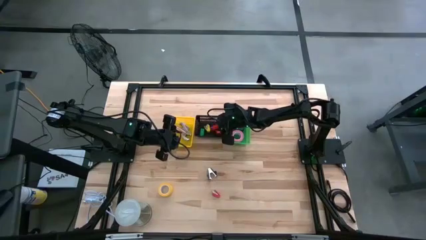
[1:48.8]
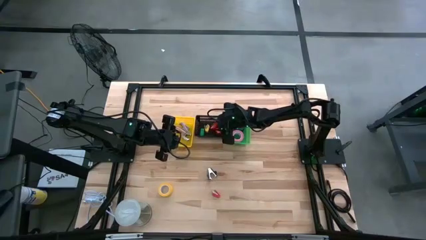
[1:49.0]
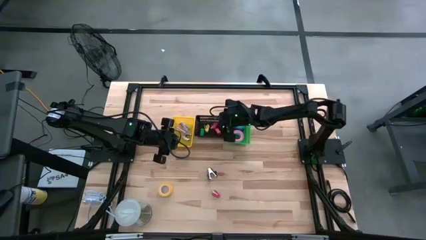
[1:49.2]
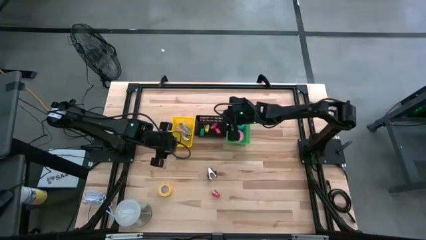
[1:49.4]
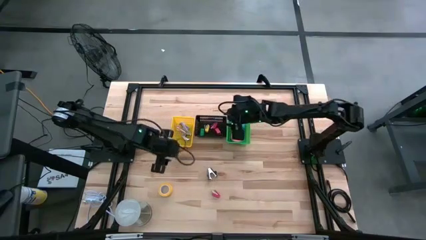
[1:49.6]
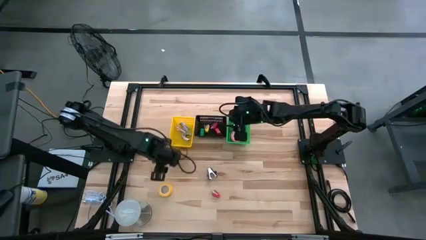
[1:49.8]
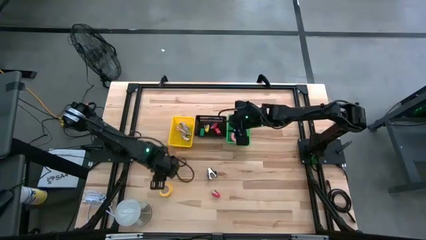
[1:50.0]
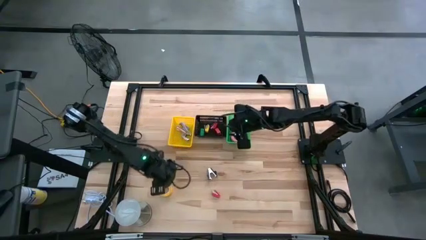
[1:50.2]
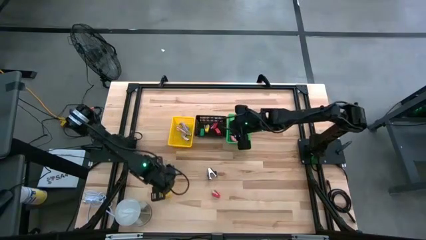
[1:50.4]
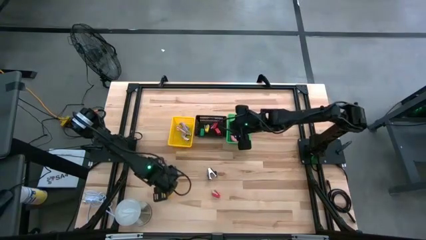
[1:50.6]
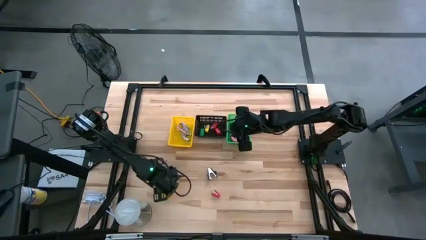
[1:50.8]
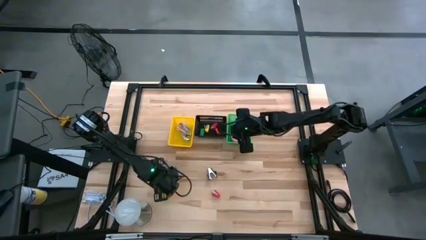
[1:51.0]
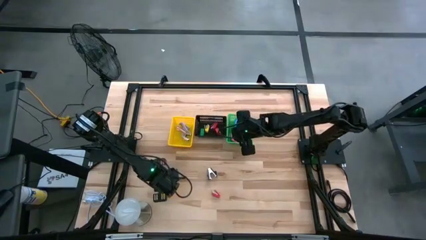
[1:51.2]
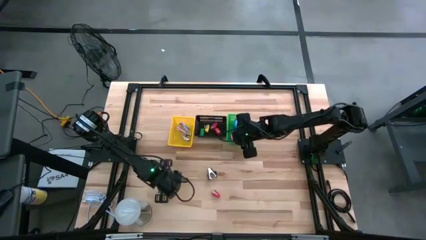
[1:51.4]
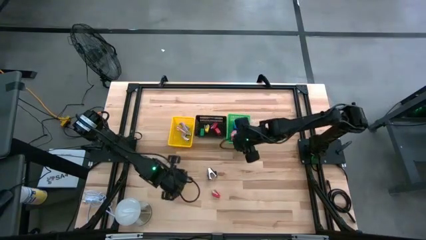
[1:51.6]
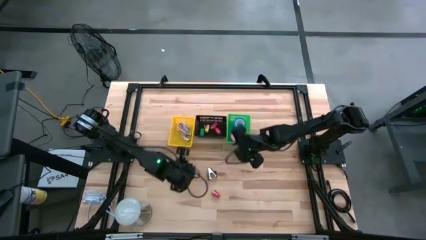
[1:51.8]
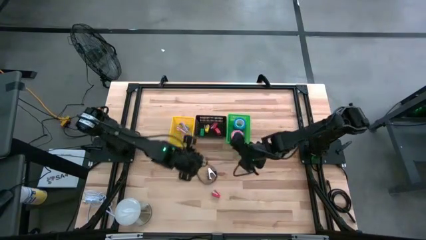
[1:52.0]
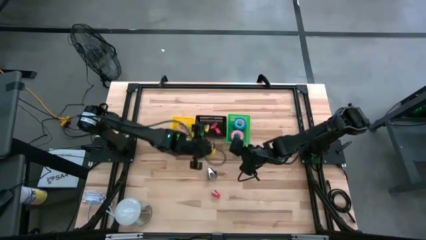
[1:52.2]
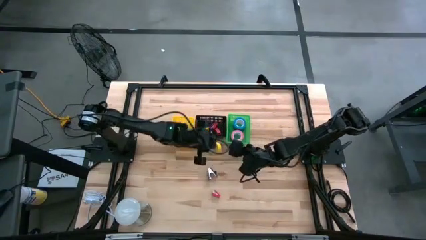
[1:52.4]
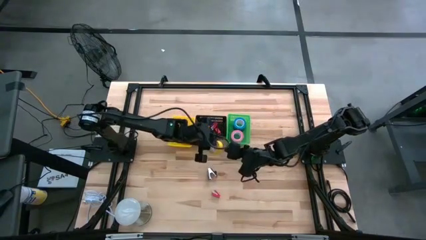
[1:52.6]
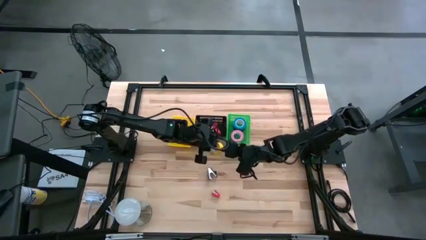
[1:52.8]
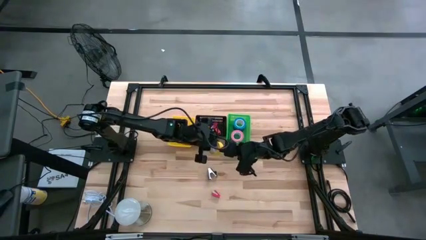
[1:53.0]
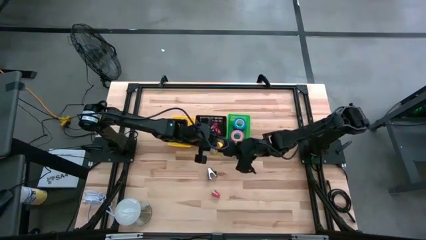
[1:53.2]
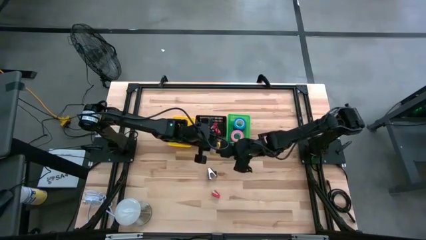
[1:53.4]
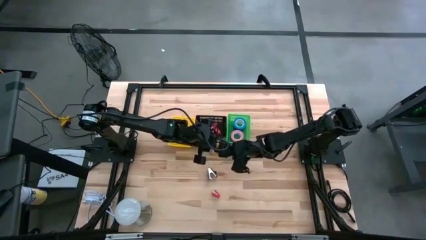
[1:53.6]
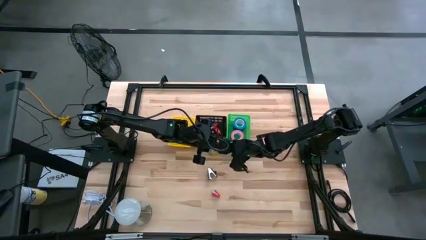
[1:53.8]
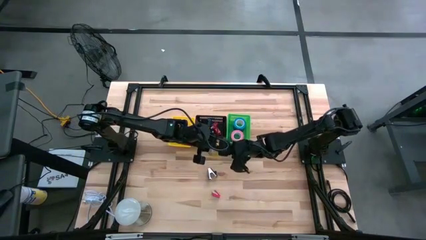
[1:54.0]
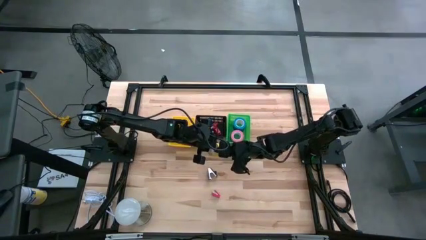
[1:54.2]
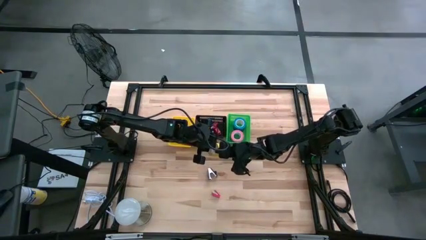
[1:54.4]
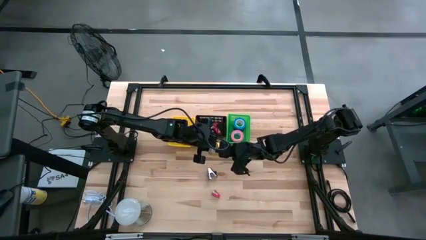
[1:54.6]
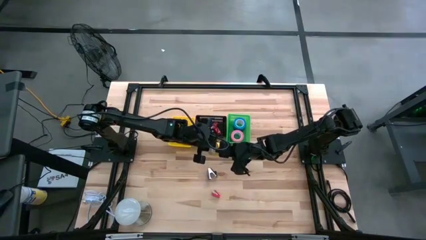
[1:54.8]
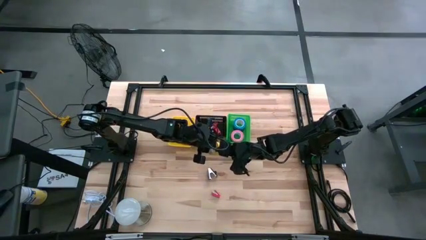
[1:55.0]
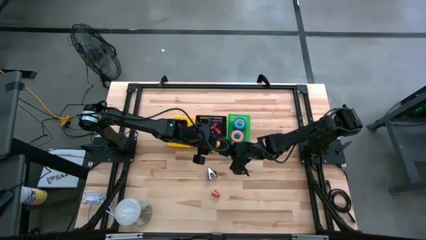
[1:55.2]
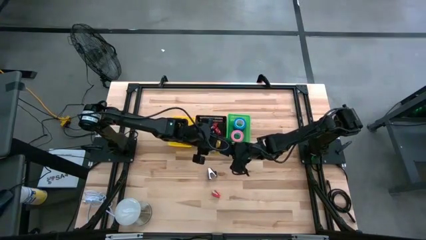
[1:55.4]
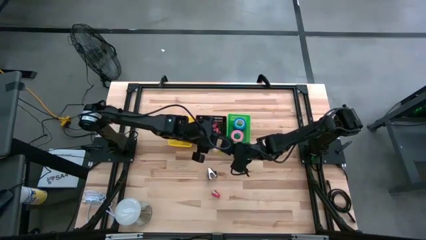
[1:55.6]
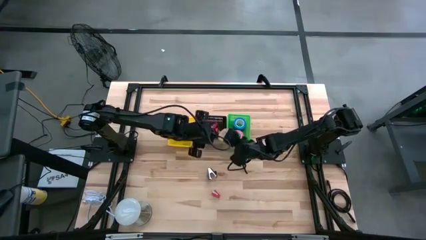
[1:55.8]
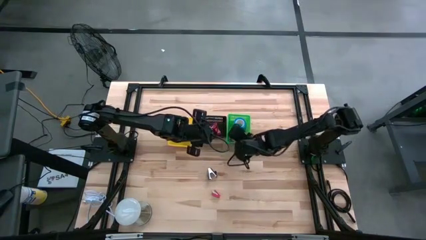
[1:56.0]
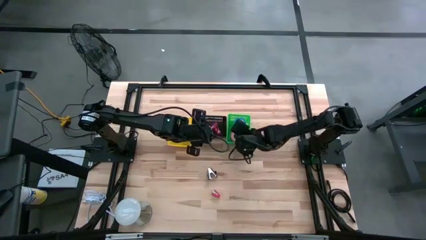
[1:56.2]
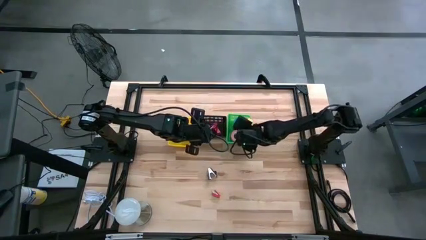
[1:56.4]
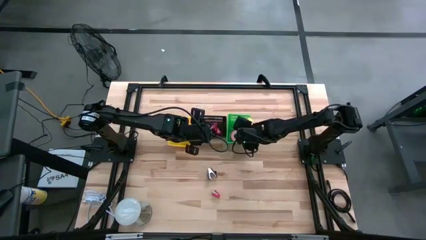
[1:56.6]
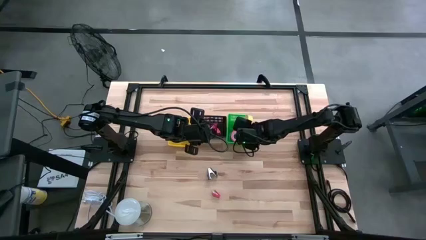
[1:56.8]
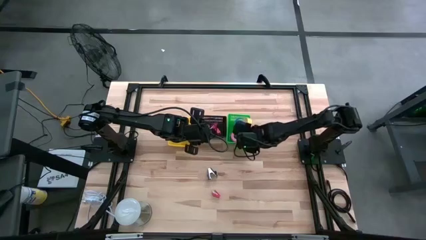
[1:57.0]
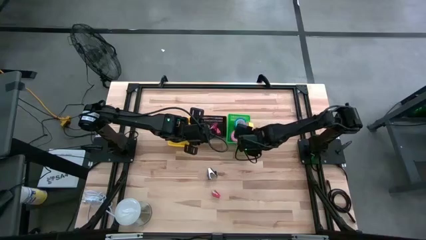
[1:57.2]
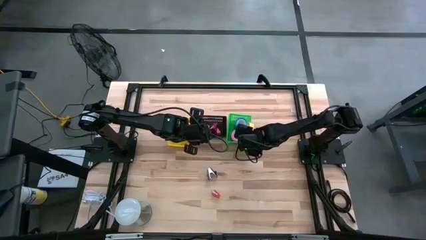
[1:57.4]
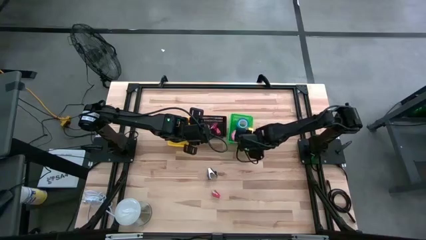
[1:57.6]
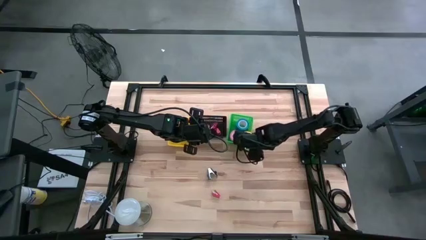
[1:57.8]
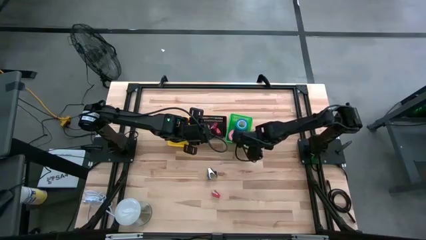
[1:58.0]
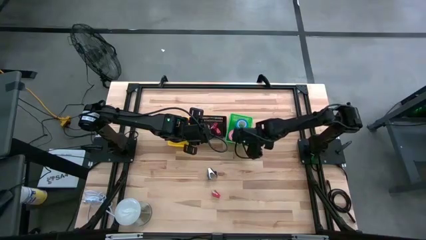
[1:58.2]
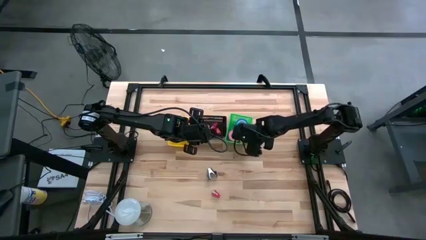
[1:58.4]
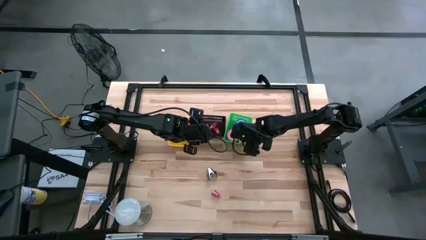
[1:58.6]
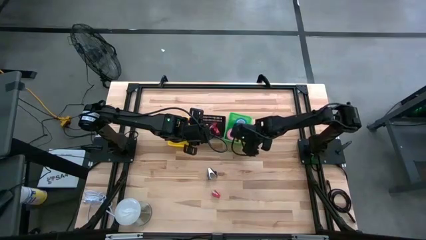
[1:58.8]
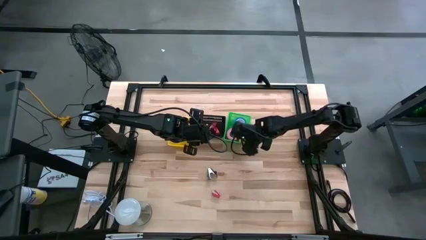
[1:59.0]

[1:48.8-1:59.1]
Task: Pick and place Stapler, Stapler remover, tape
Put the yellow tape into the green bin

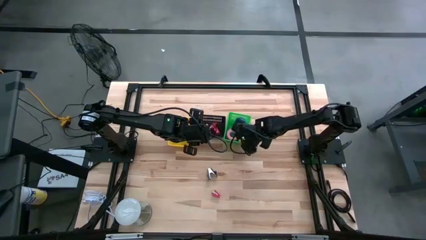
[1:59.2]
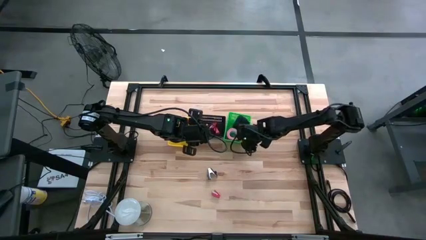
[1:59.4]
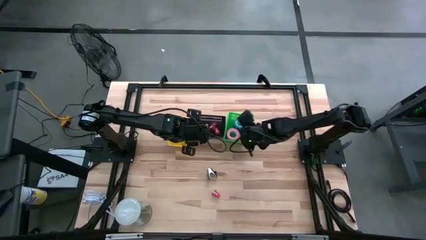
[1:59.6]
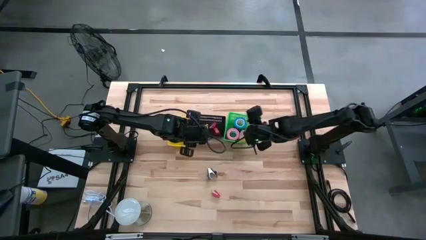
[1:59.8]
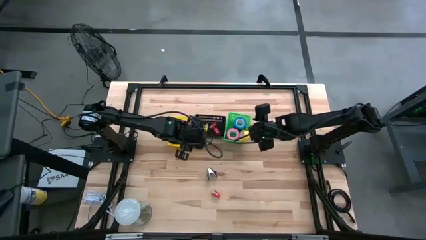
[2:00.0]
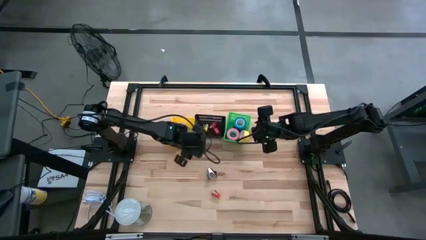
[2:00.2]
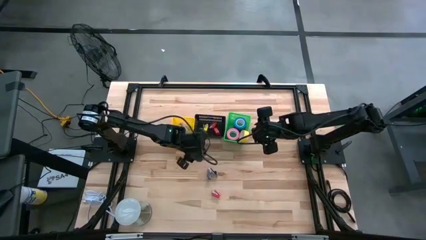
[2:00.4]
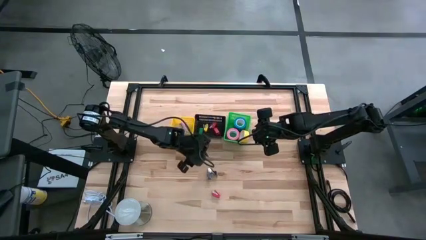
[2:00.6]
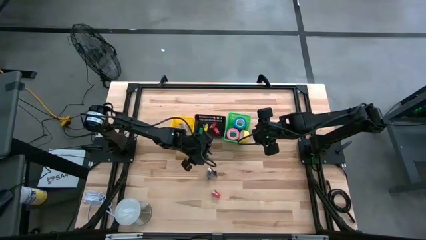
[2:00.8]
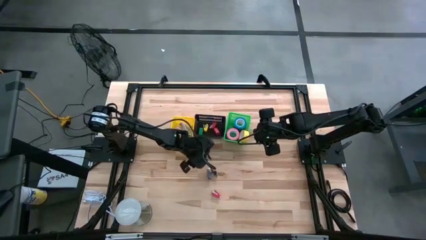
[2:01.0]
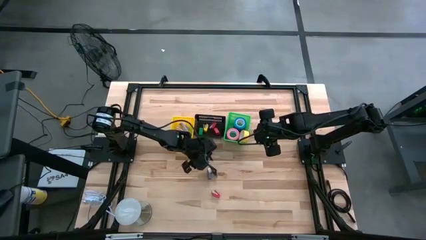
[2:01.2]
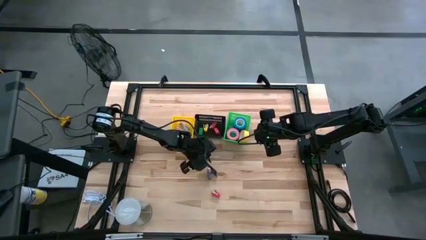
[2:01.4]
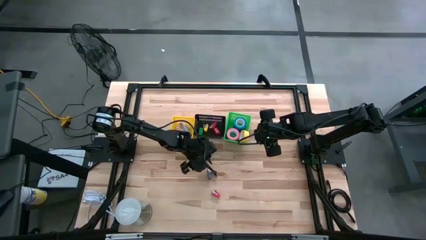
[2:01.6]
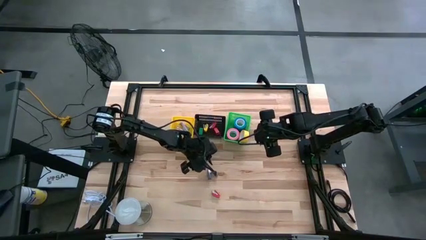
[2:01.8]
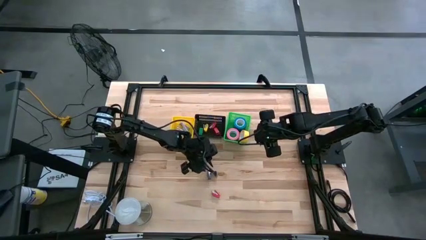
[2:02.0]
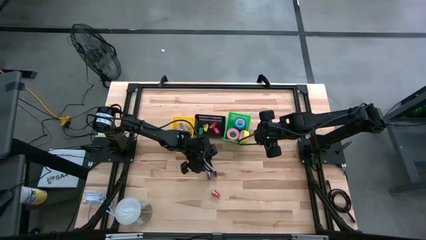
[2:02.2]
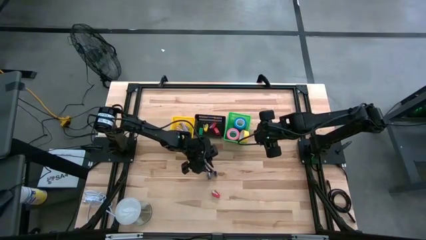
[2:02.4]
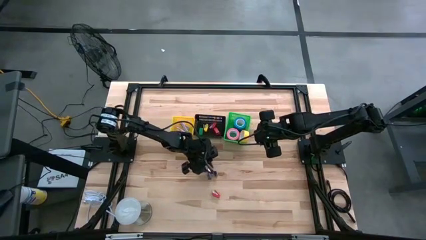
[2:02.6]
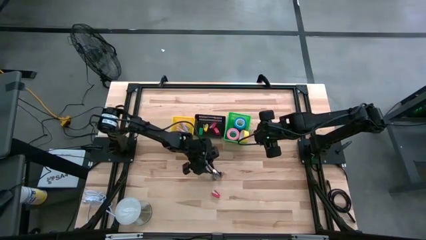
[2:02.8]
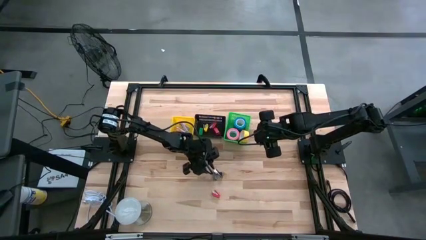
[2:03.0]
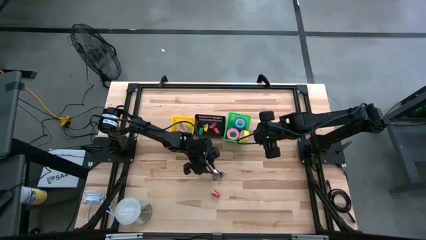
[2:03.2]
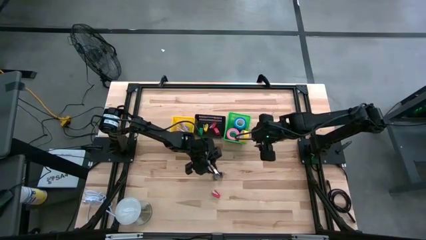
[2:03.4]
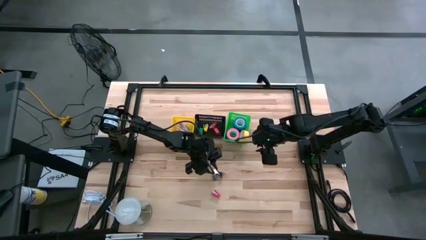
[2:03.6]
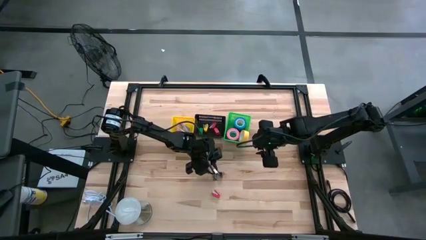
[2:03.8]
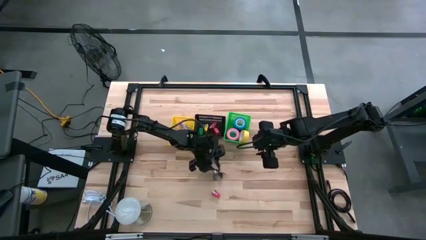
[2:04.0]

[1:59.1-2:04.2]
Put the black staple remover into the yellow bin
